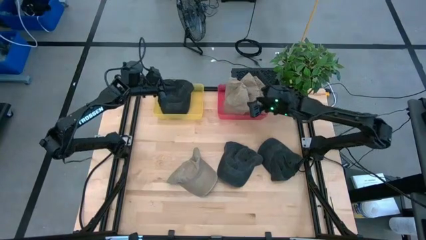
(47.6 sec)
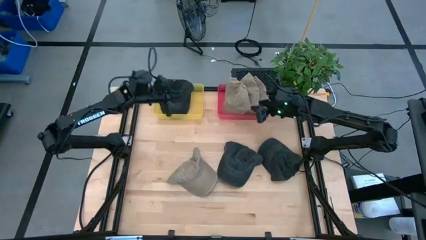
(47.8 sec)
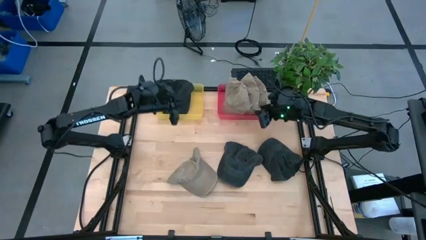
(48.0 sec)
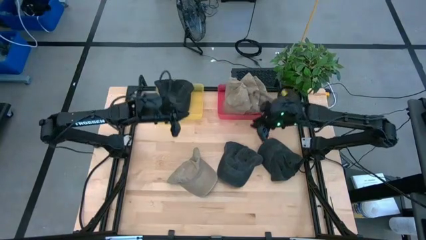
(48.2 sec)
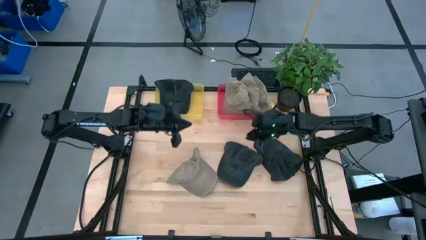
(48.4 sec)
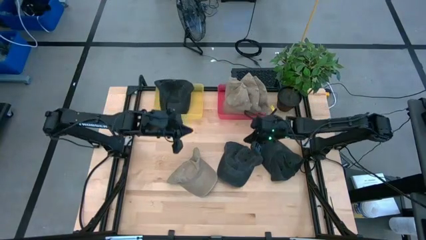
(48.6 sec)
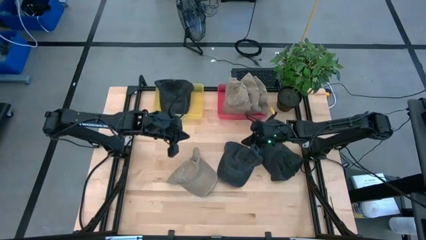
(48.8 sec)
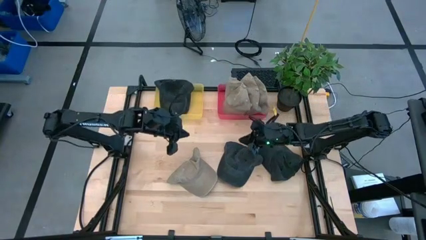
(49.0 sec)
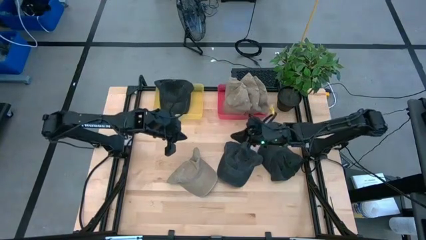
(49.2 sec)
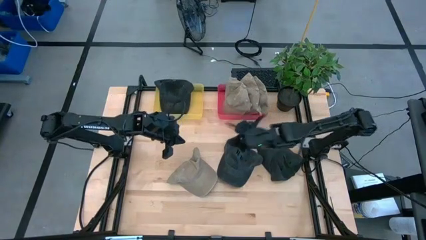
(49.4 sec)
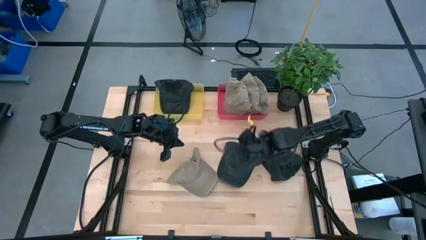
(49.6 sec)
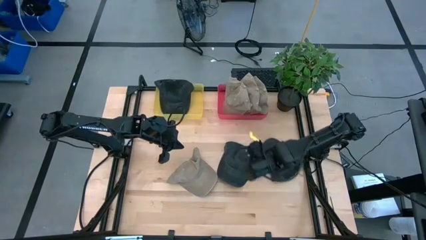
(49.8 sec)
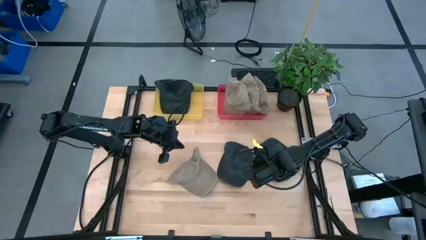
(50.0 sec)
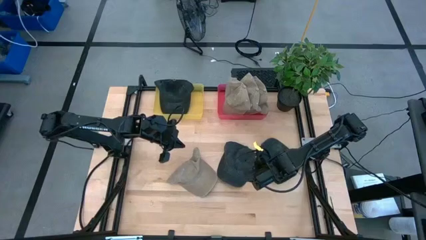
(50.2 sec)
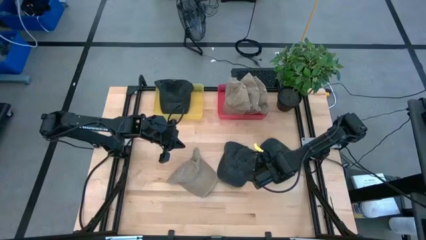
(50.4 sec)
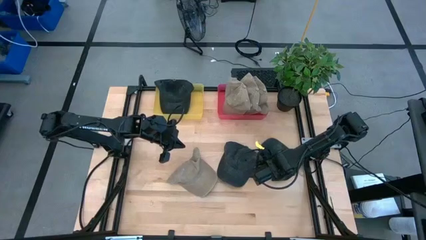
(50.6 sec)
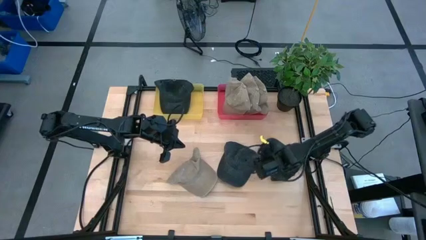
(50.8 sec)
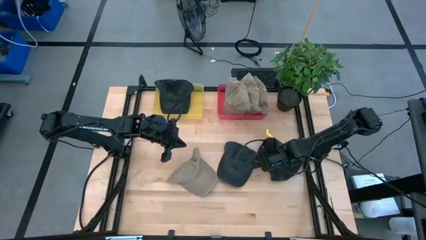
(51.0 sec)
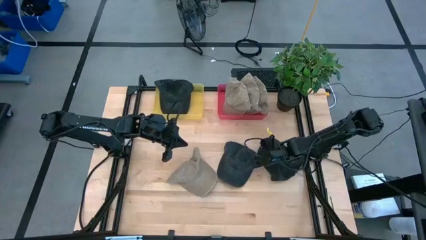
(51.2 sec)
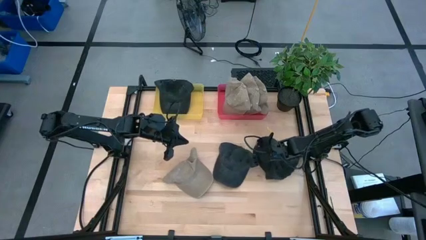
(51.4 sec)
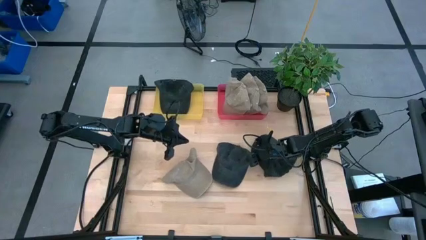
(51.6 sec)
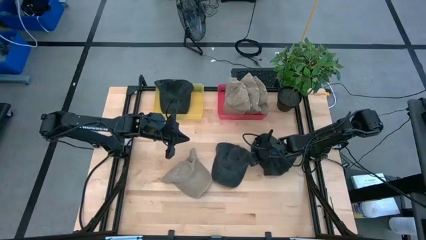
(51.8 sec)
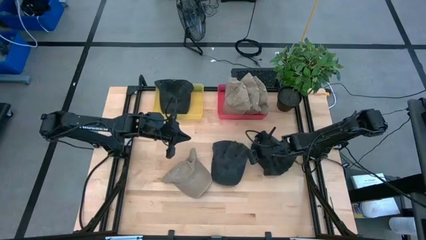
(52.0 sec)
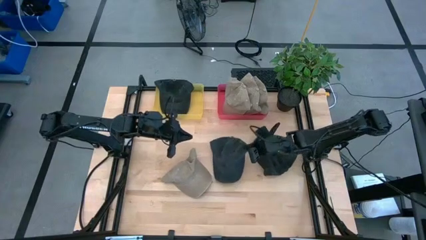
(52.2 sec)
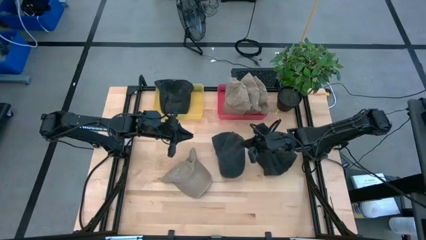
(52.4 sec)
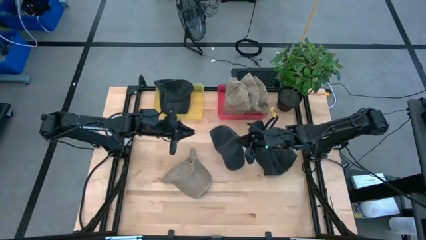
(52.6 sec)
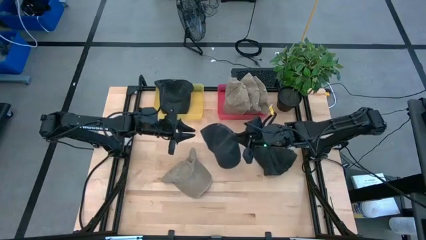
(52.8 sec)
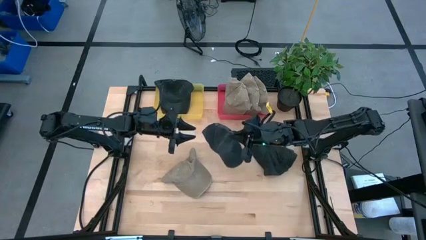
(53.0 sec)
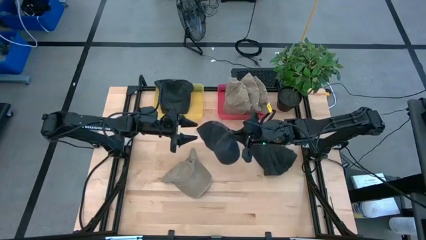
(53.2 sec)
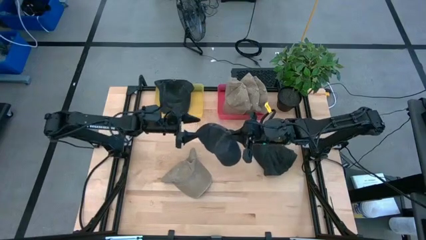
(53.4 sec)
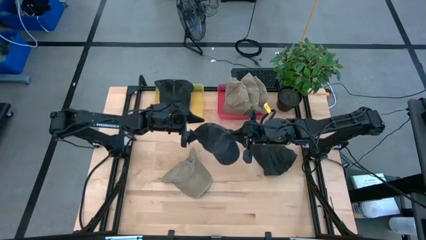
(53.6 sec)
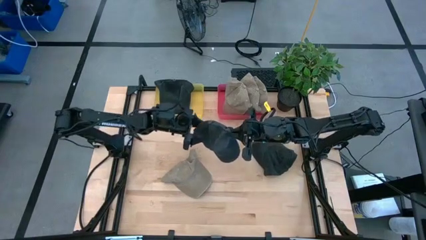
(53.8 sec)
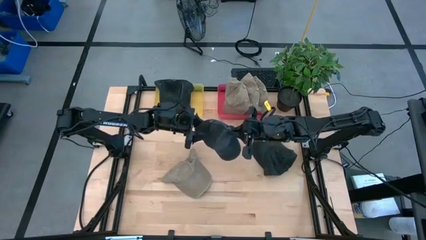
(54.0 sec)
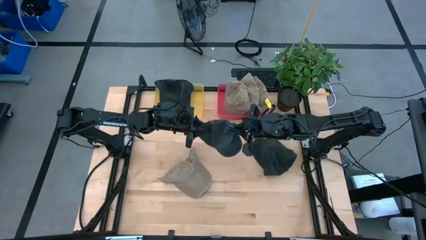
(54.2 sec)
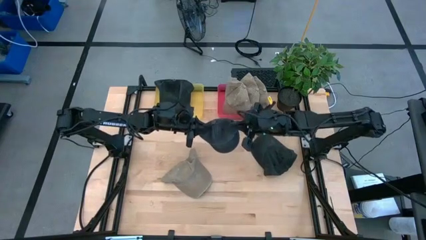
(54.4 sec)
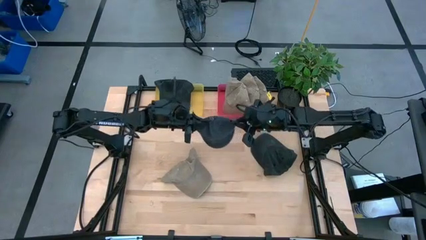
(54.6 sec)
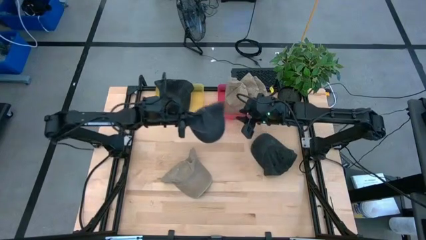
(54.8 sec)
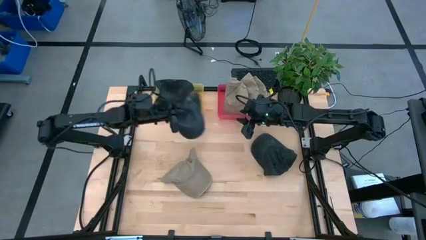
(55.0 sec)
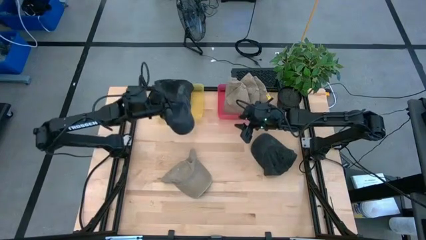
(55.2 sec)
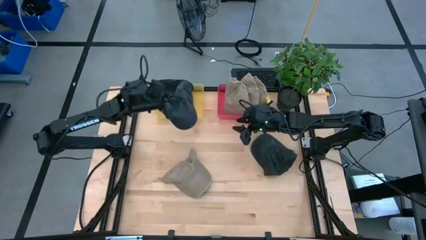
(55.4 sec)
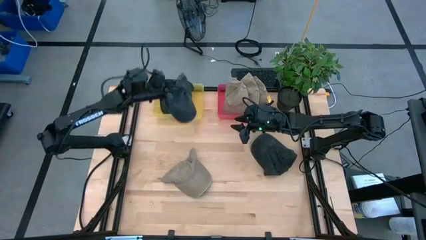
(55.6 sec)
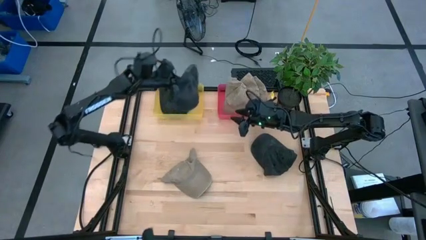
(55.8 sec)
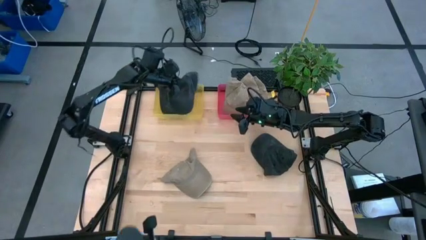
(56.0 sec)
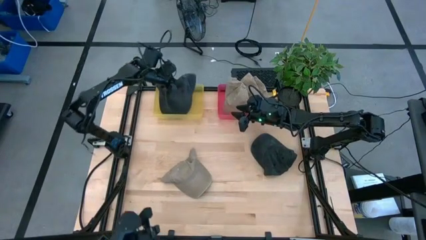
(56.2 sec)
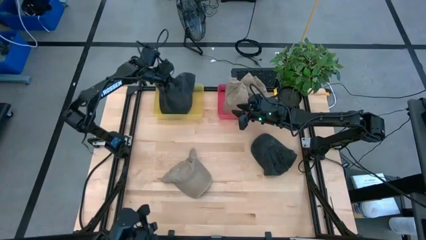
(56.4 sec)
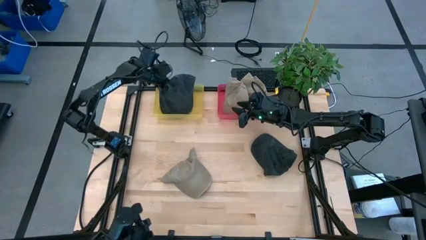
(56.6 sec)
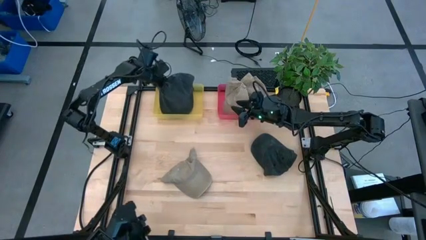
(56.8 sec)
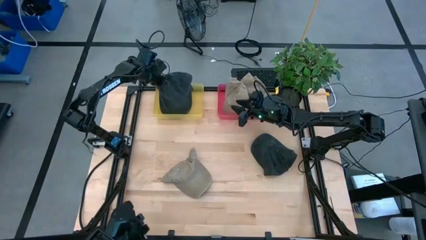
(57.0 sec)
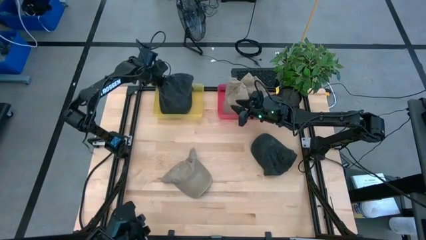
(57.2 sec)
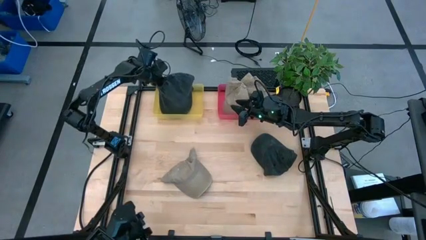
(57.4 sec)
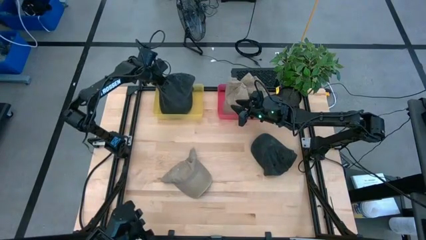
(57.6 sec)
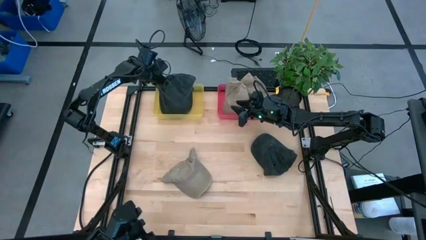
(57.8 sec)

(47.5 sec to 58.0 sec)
Task: Pick & Place hat
Put the black cap into the yellow bin

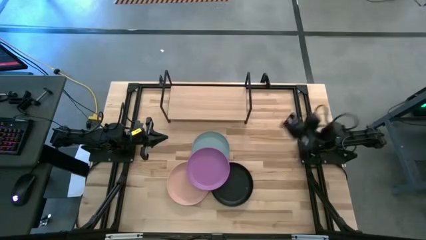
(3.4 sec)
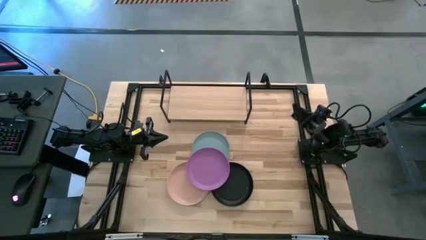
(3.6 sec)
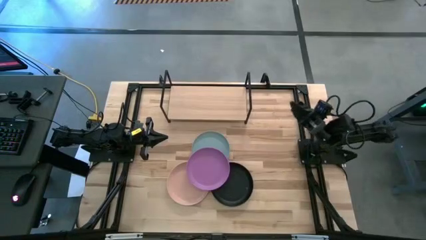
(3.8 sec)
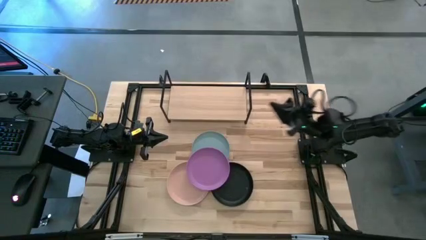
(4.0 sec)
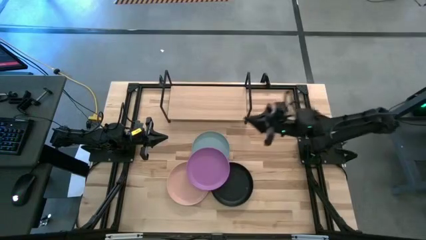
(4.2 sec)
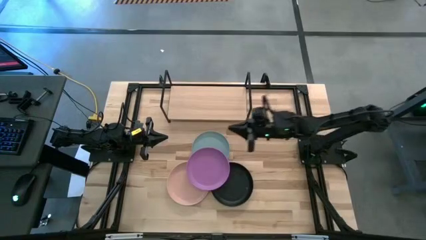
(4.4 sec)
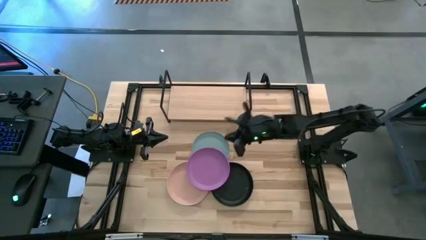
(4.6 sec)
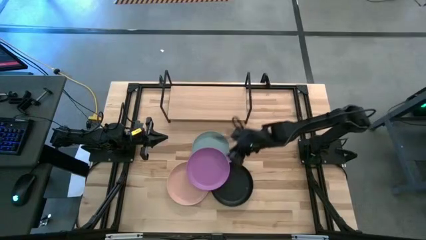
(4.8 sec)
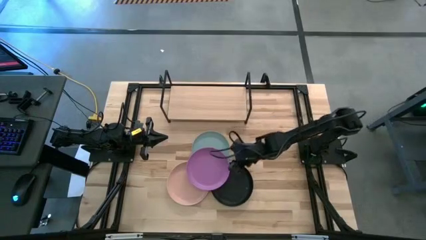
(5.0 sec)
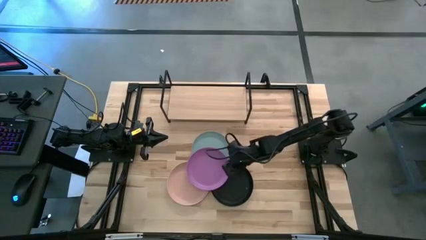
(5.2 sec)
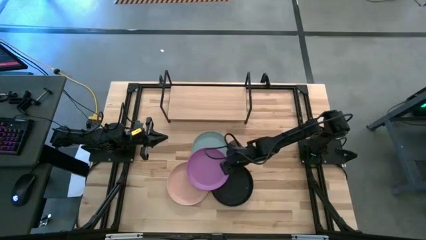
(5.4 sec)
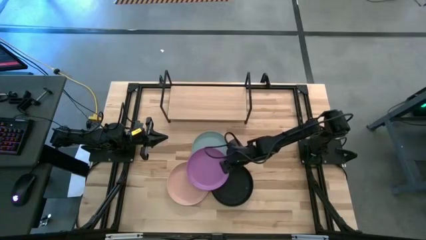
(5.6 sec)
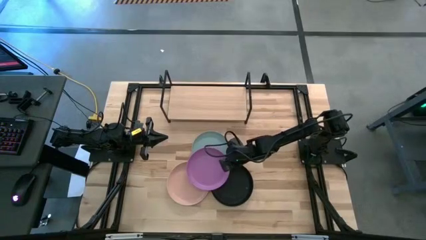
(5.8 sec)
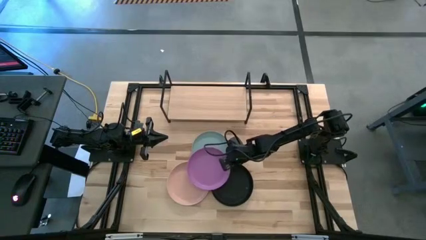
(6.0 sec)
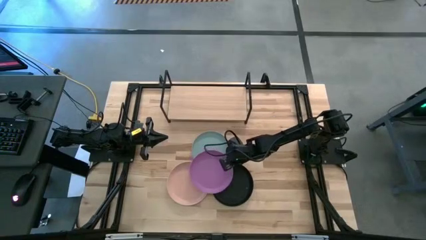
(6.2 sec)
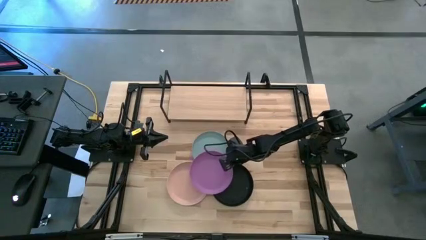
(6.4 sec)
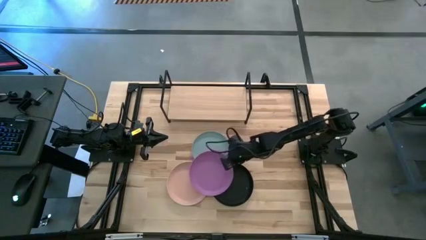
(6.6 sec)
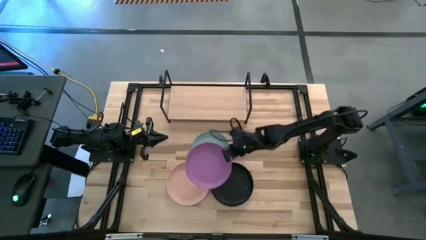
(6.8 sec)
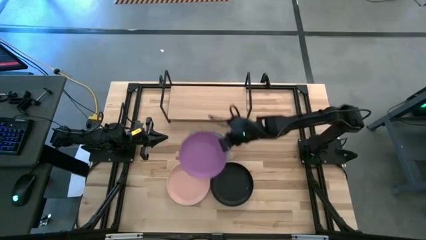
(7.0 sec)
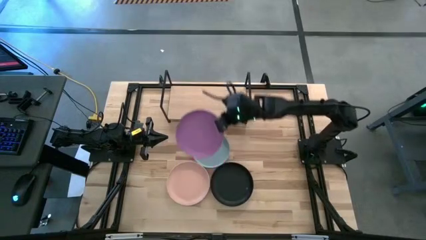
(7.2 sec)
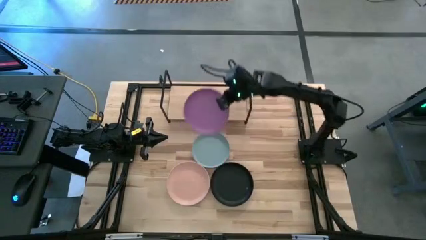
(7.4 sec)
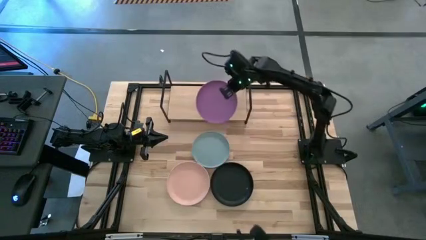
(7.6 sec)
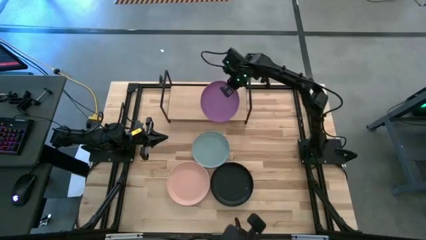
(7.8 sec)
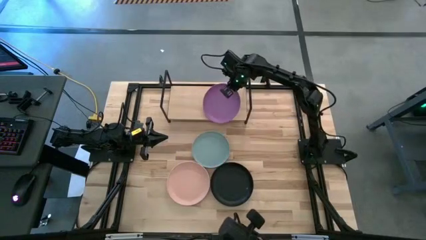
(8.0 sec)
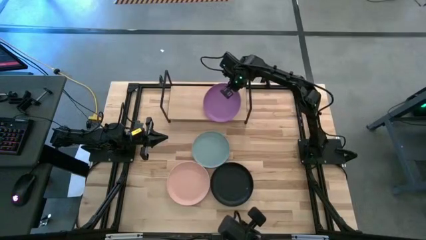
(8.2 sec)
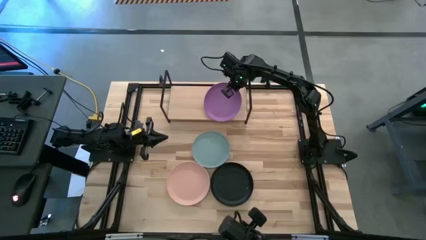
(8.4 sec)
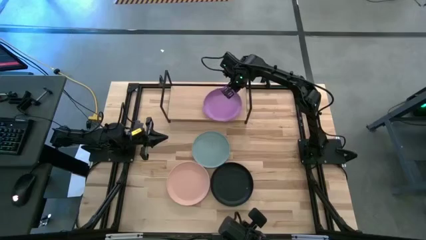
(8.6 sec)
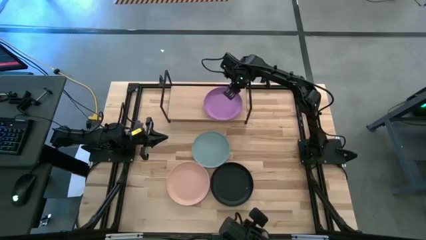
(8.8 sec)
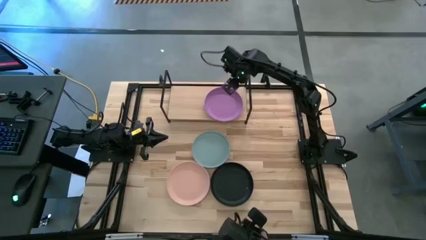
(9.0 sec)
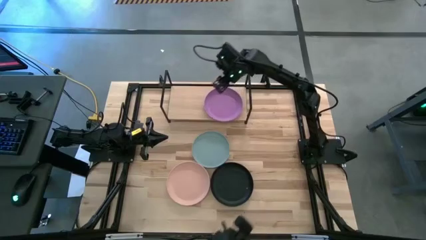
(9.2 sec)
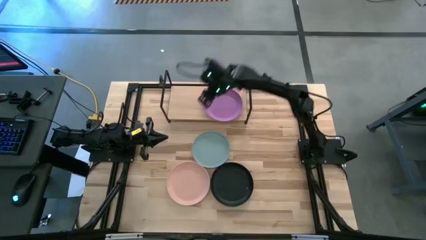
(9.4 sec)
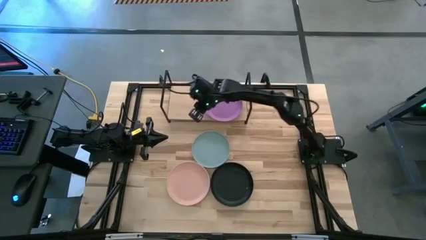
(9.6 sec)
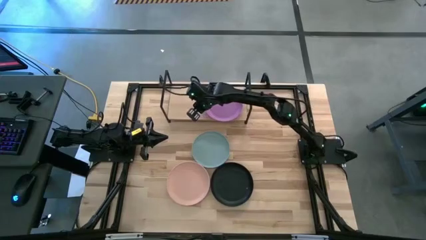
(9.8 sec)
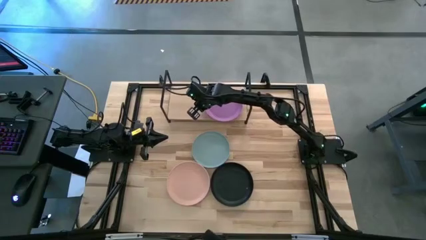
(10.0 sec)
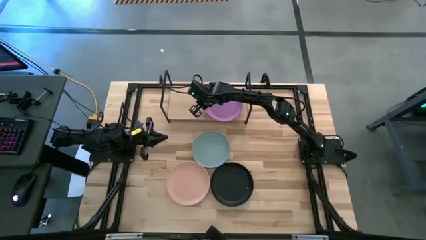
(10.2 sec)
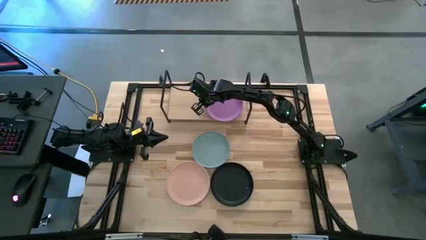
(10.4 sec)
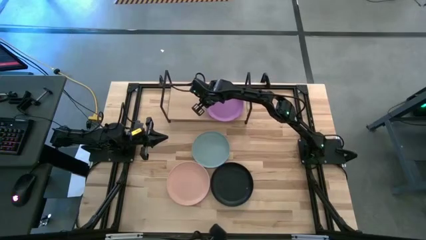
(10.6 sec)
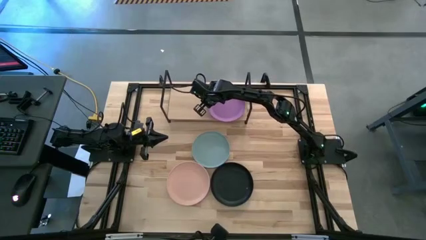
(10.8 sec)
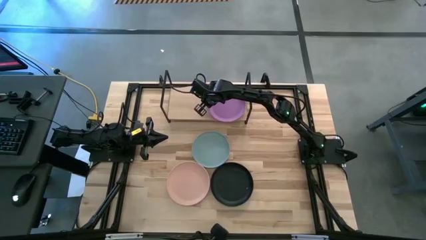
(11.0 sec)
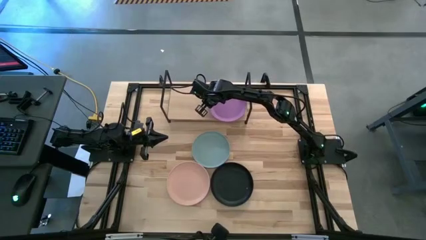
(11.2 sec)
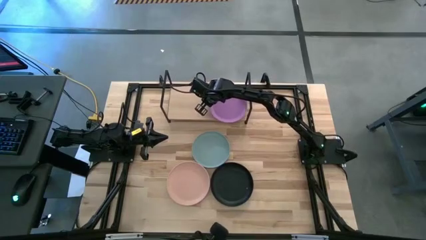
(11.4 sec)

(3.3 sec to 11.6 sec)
Task: Place and stack plates onto a shelf
Put the purple plate on the shelf
